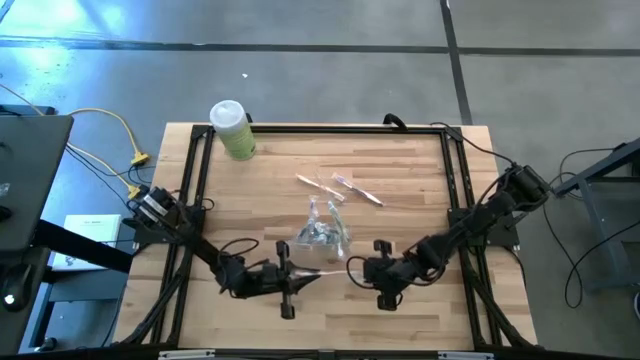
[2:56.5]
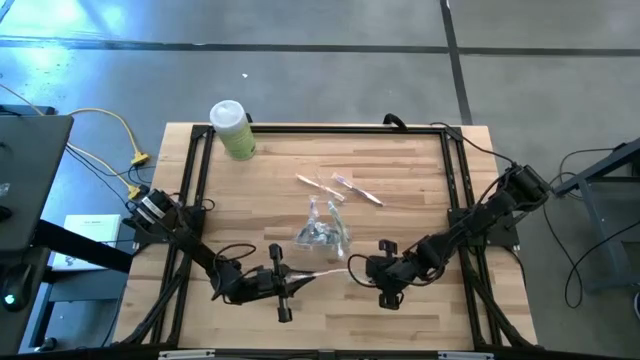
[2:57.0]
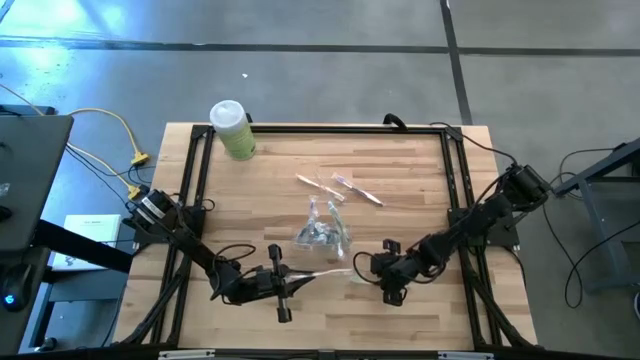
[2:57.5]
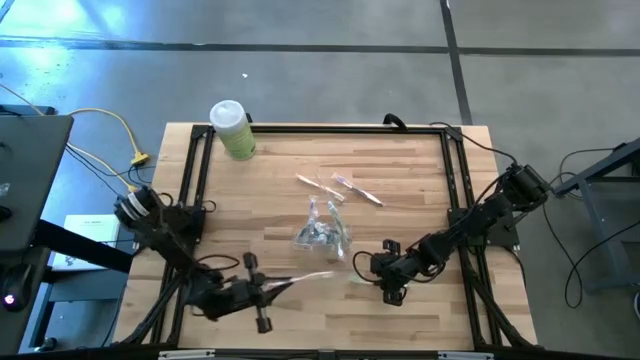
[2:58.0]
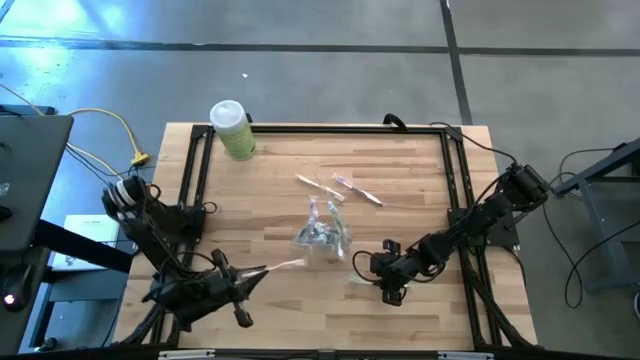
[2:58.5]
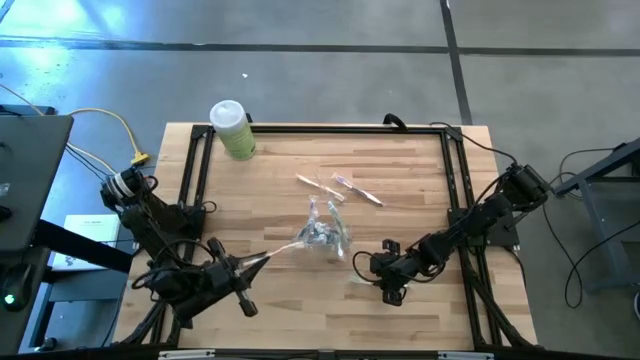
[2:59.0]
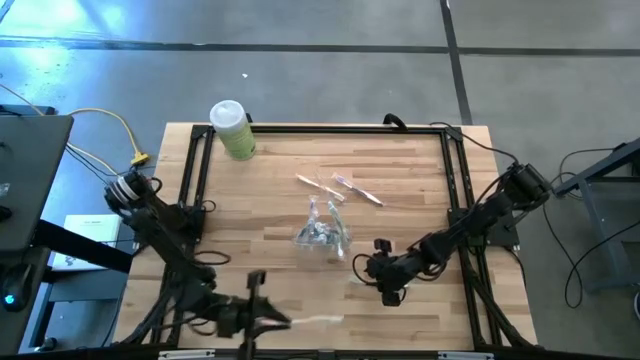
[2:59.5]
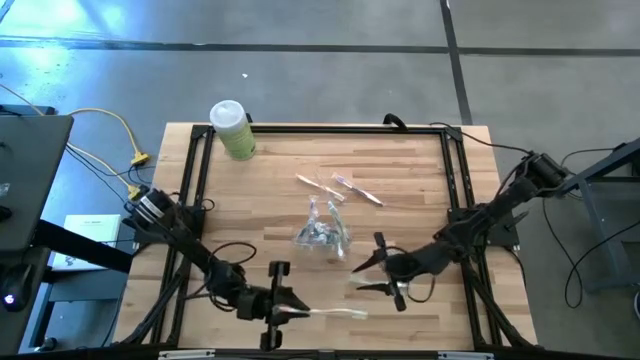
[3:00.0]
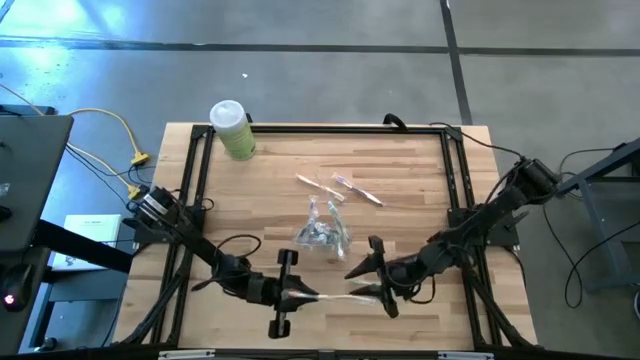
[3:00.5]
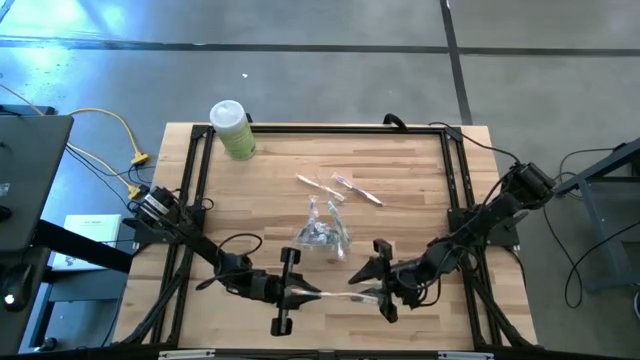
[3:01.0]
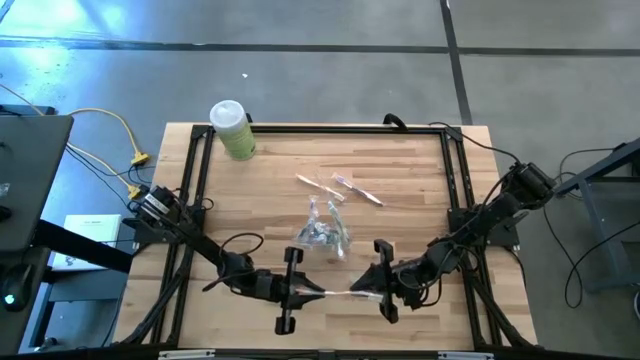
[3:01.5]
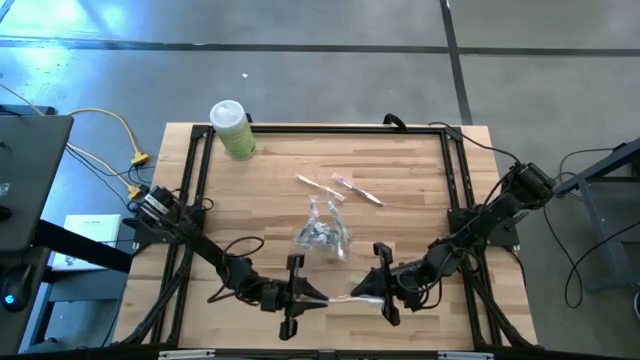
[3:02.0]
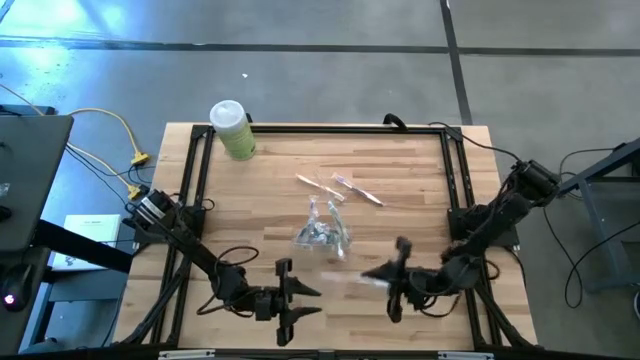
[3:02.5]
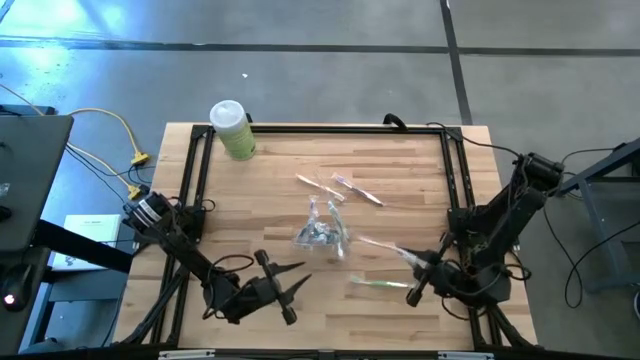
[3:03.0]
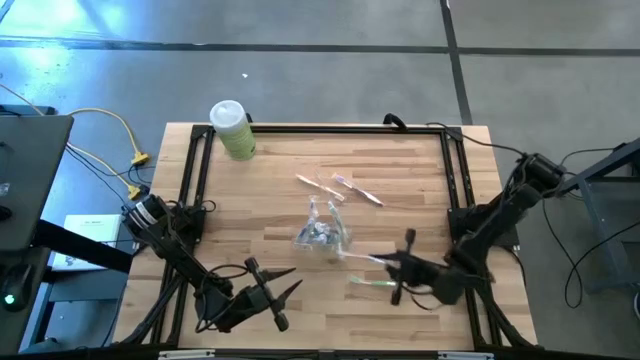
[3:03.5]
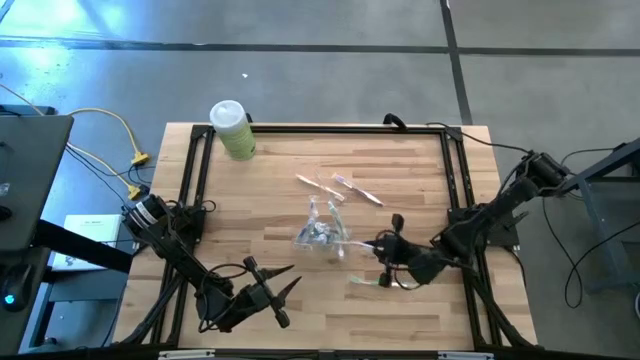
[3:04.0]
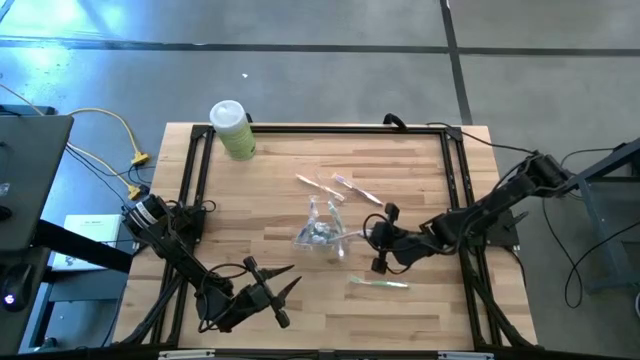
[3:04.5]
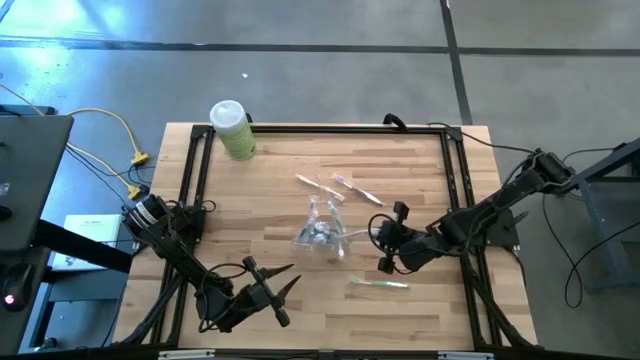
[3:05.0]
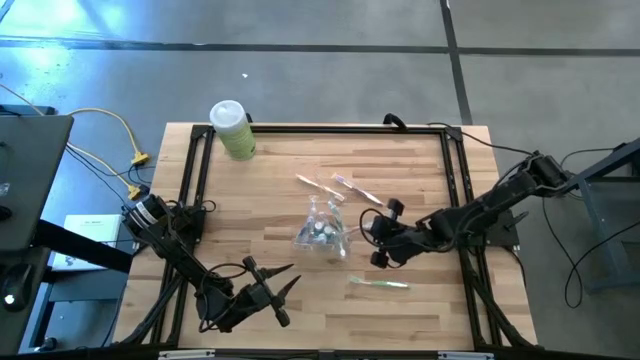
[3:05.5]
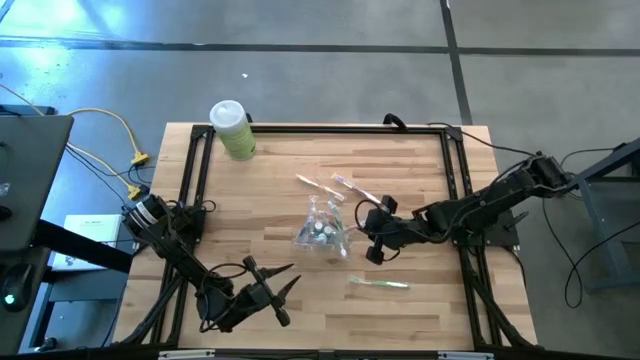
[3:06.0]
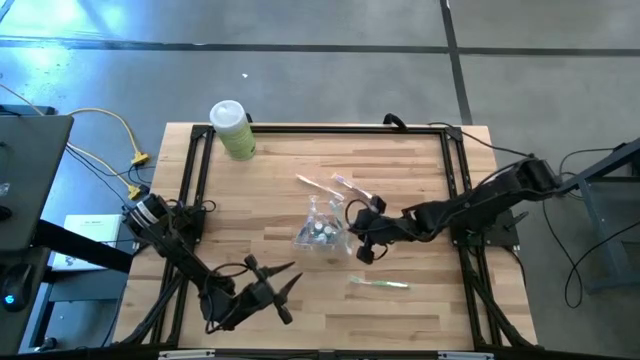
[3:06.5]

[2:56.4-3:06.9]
Task: Pick & Place toothbrushing station
Put the orange toothbrush into the transparent organizer

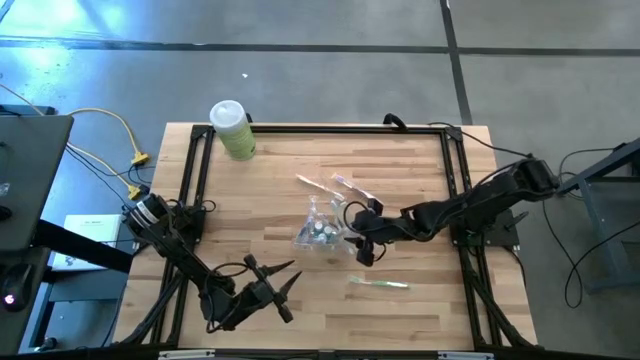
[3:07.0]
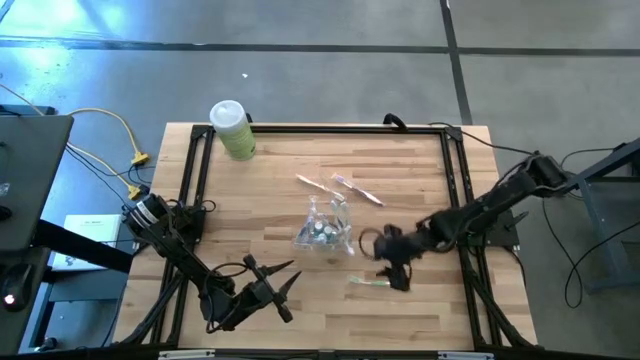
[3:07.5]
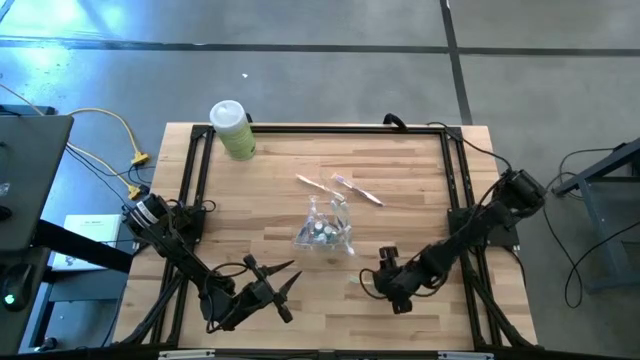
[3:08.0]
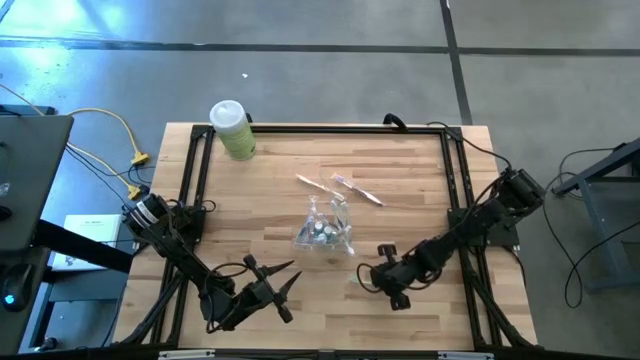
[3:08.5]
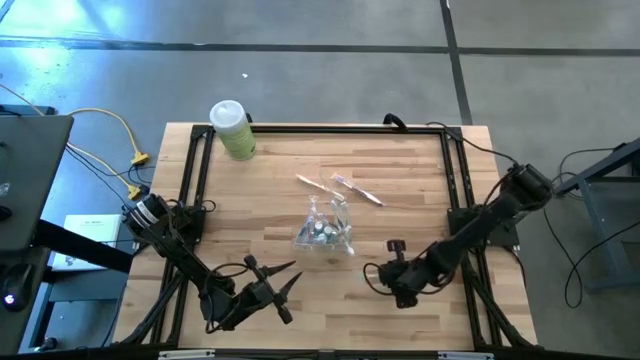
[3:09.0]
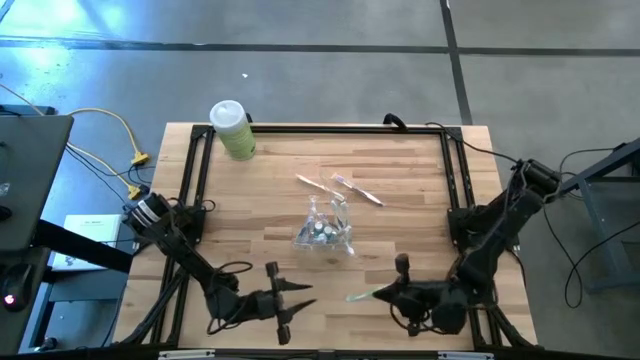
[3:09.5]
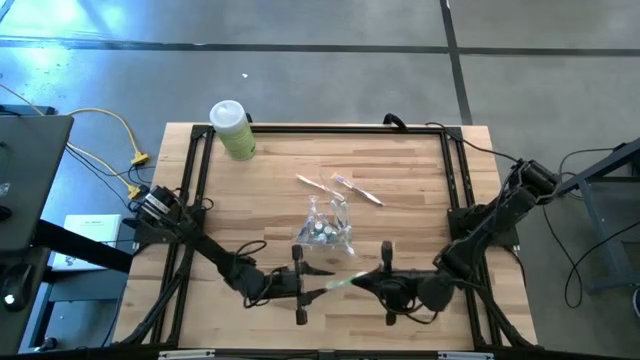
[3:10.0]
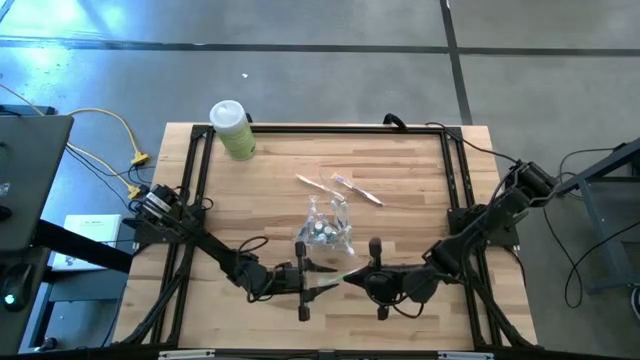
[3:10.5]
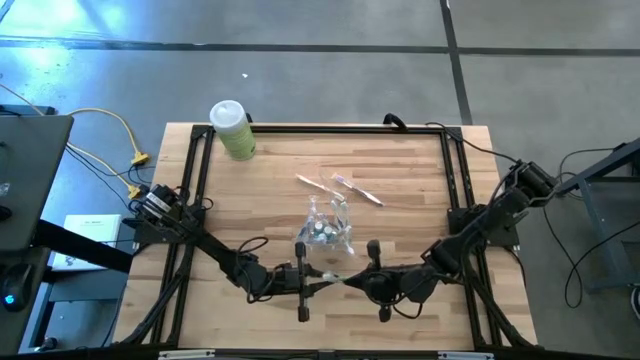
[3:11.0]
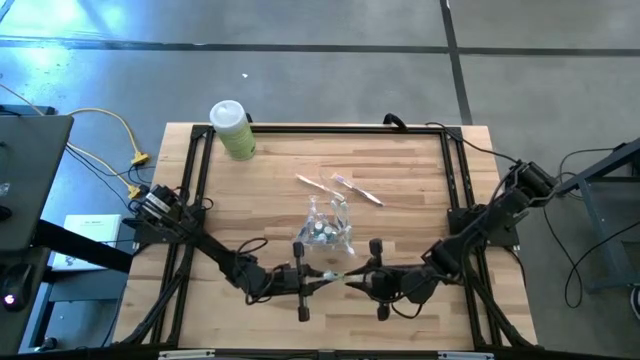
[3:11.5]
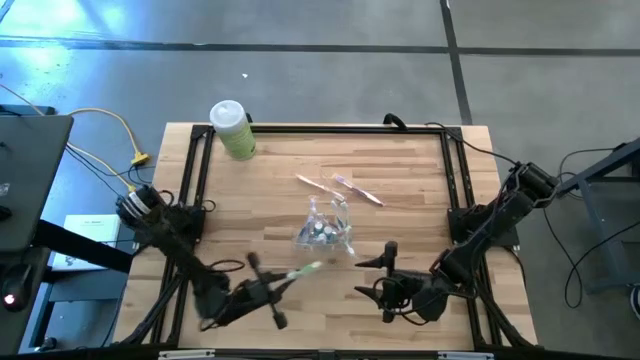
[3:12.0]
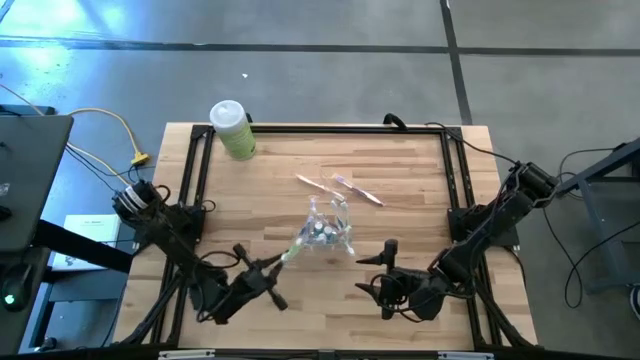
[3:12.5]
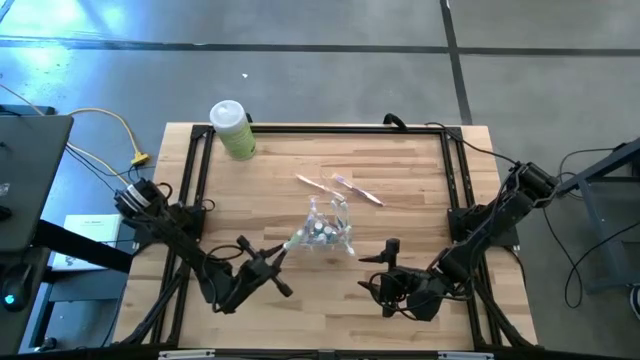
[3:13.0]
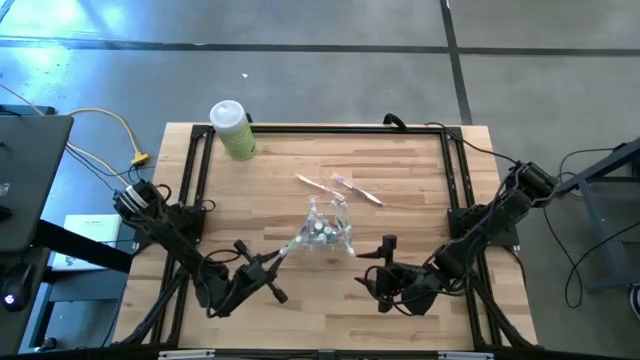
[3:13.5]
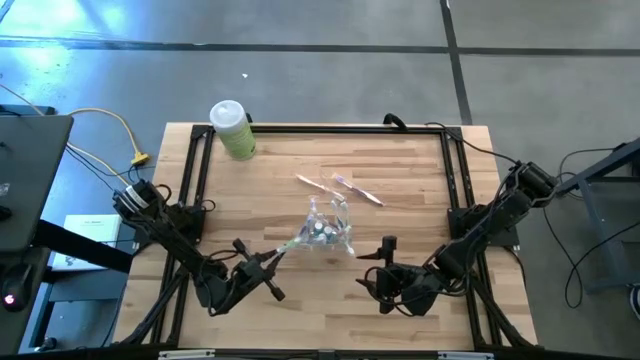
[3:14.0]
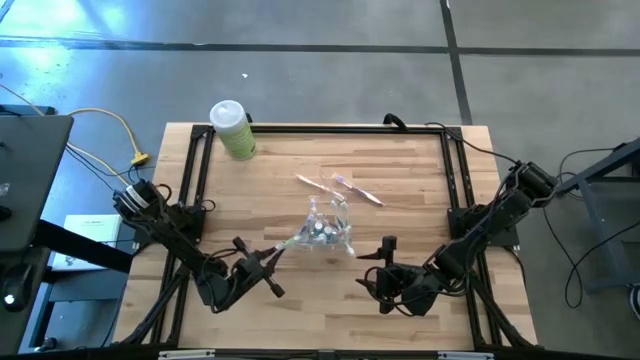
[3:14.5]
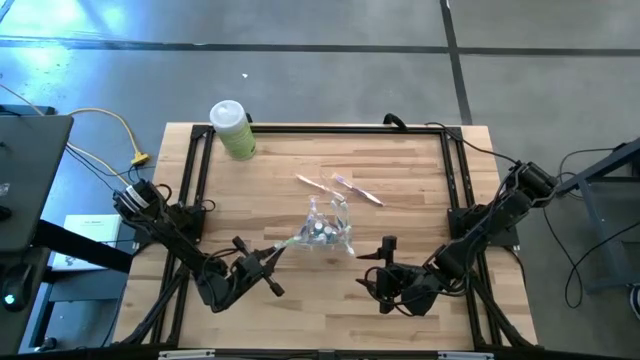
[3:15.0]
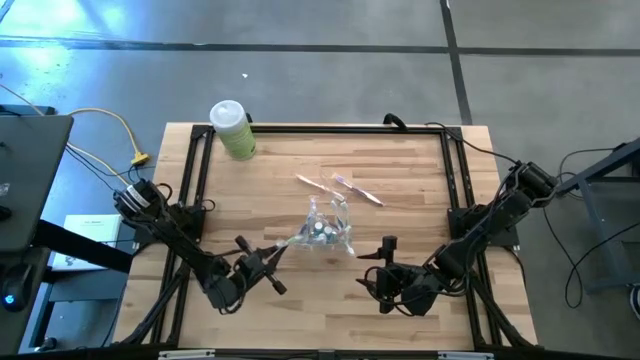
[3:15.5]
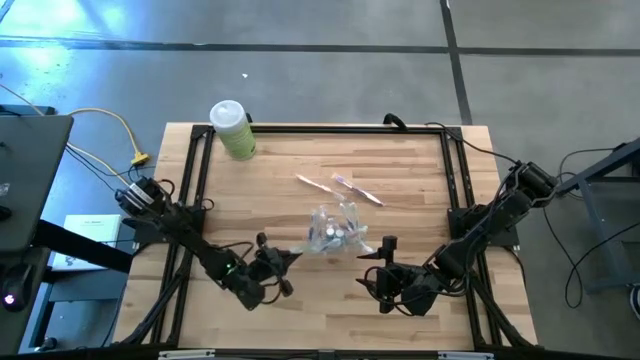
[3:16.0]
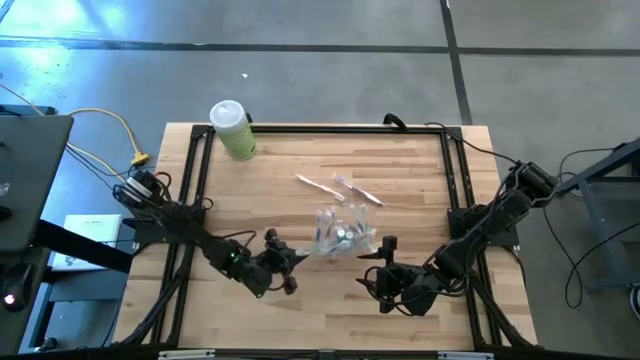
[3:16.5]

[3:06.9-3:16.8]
Put the green toothbrush into the transparent organizer
